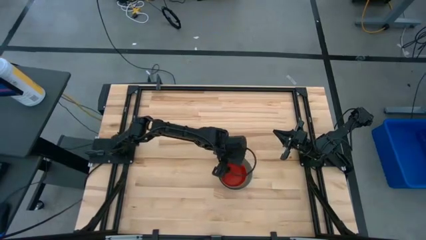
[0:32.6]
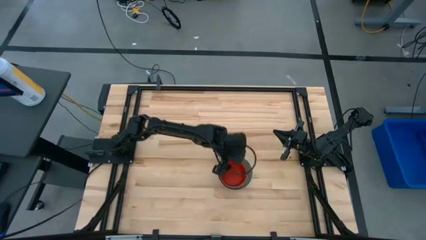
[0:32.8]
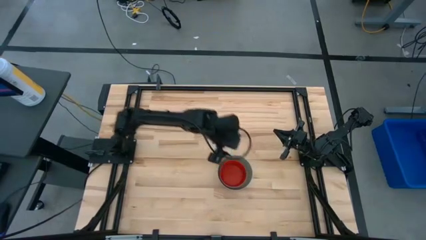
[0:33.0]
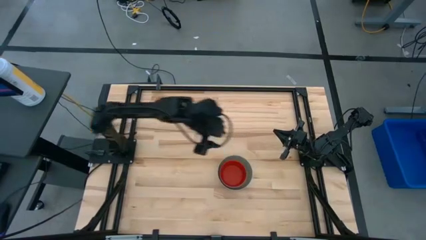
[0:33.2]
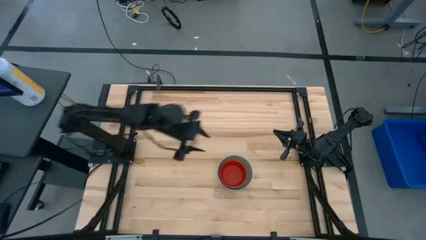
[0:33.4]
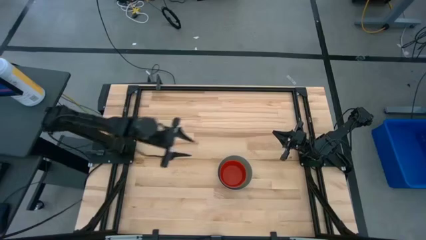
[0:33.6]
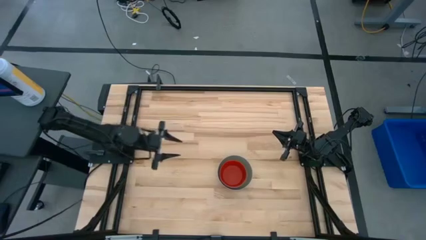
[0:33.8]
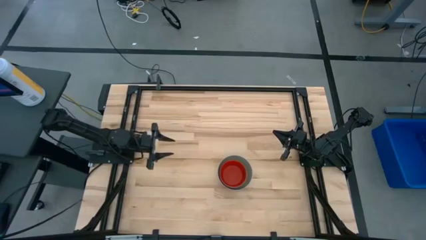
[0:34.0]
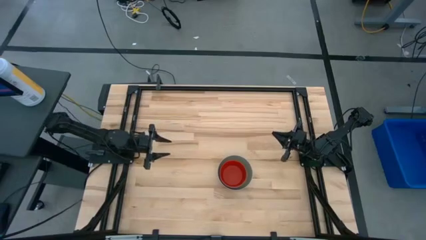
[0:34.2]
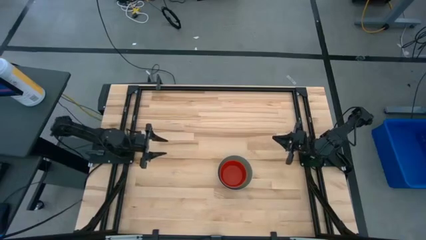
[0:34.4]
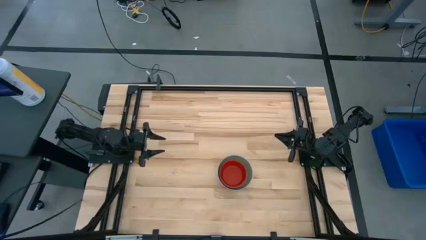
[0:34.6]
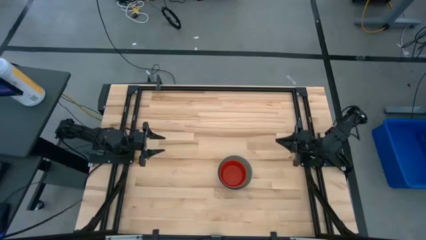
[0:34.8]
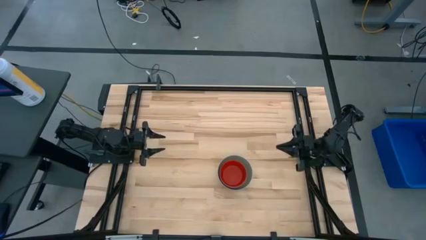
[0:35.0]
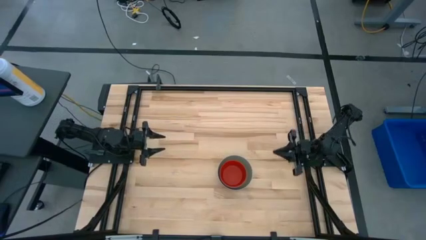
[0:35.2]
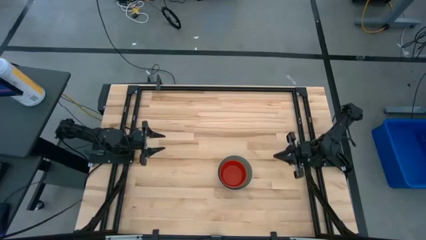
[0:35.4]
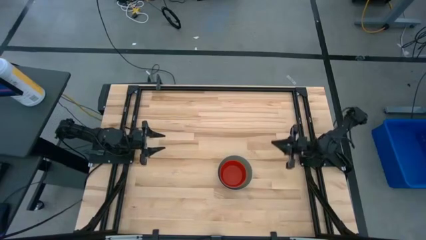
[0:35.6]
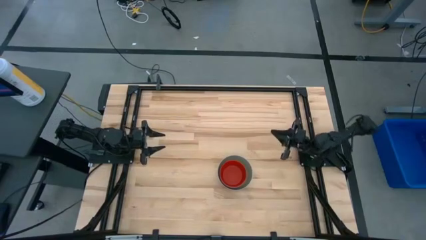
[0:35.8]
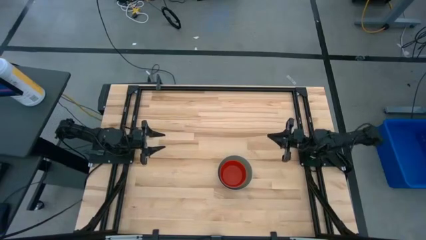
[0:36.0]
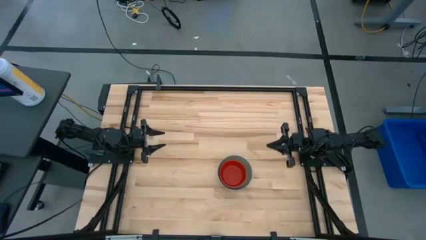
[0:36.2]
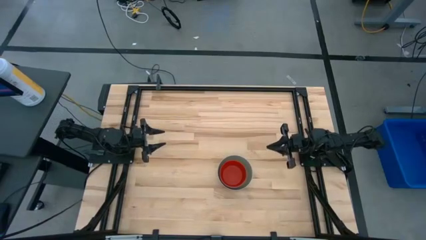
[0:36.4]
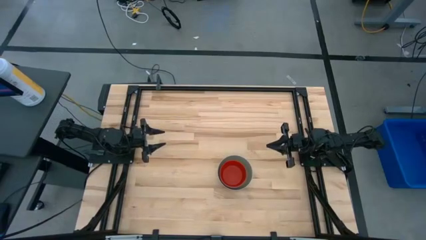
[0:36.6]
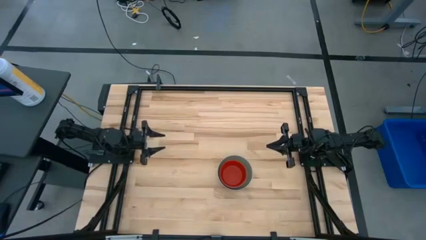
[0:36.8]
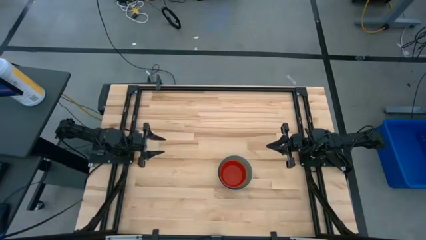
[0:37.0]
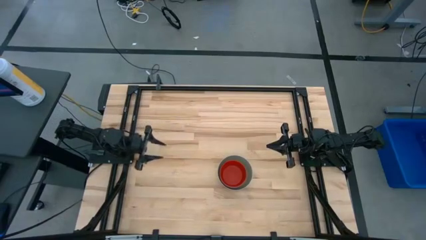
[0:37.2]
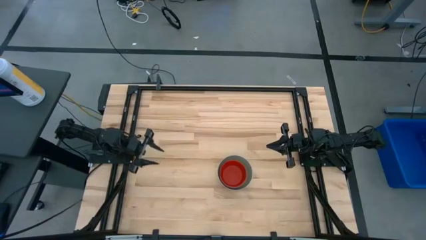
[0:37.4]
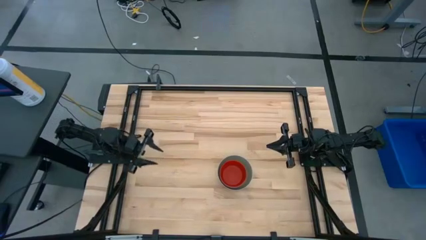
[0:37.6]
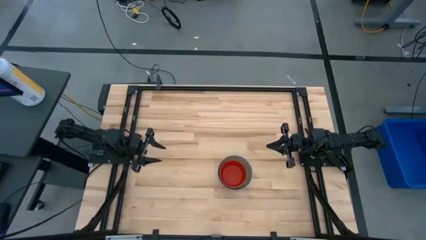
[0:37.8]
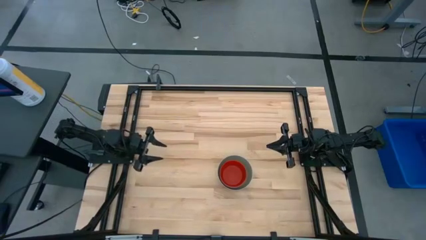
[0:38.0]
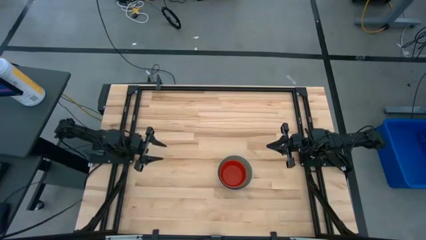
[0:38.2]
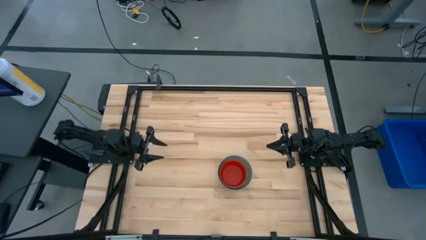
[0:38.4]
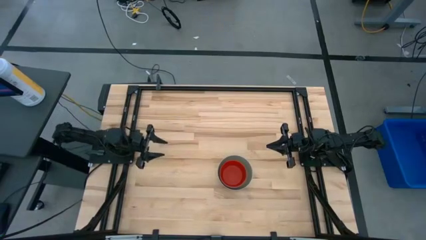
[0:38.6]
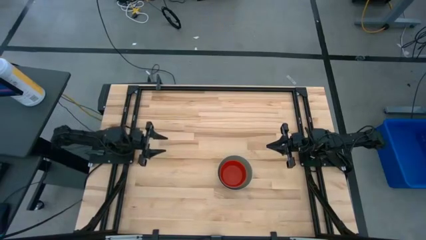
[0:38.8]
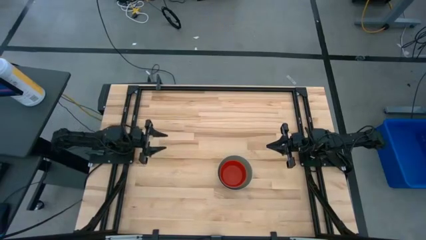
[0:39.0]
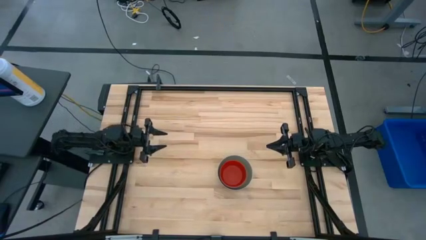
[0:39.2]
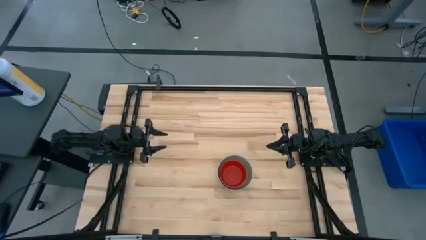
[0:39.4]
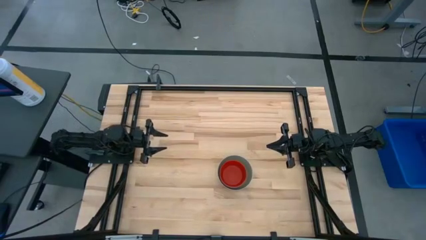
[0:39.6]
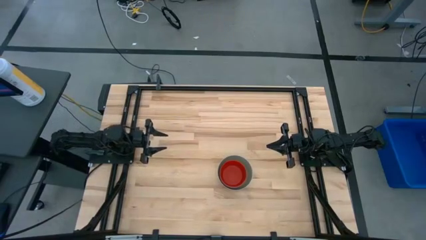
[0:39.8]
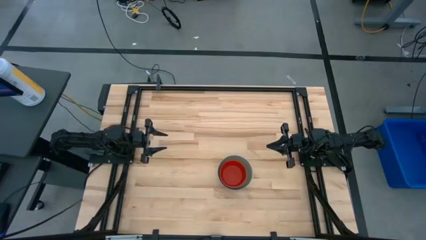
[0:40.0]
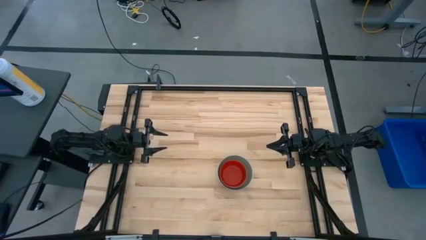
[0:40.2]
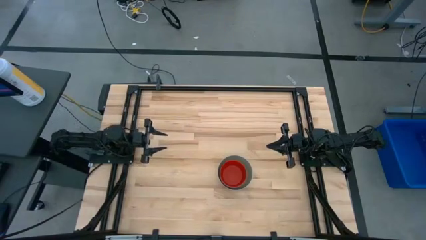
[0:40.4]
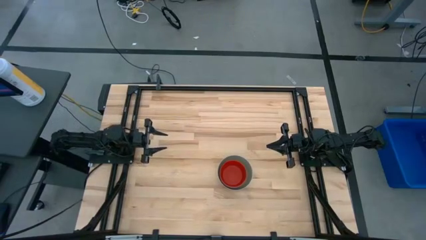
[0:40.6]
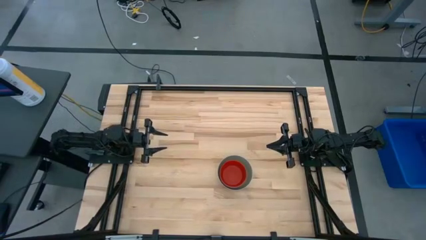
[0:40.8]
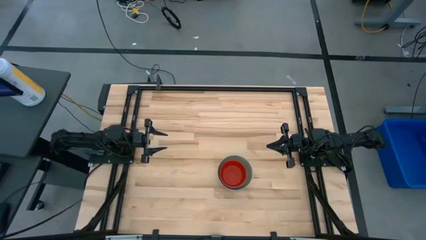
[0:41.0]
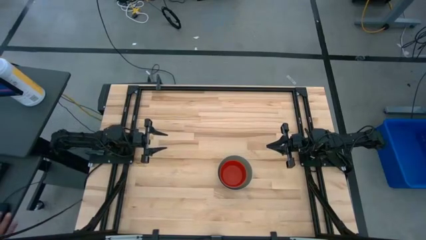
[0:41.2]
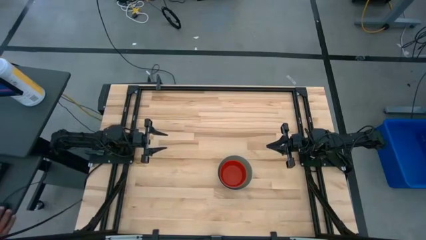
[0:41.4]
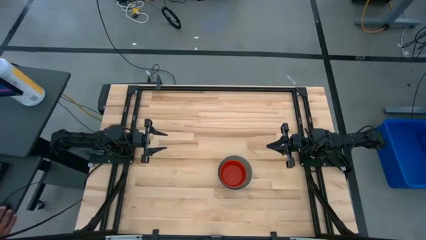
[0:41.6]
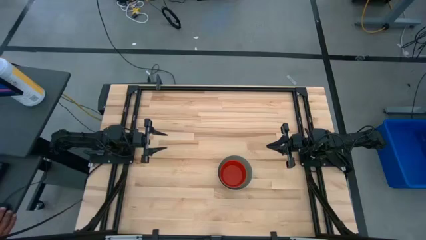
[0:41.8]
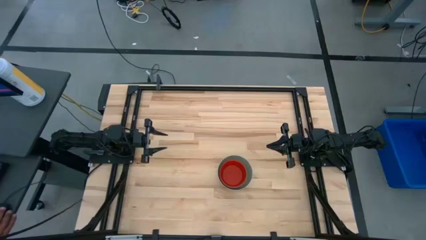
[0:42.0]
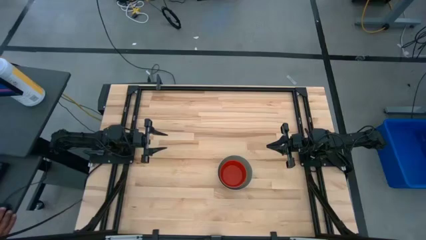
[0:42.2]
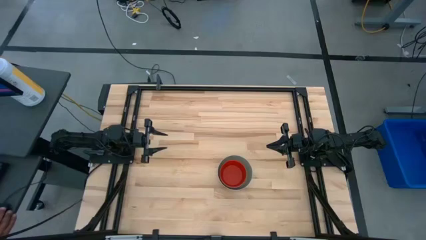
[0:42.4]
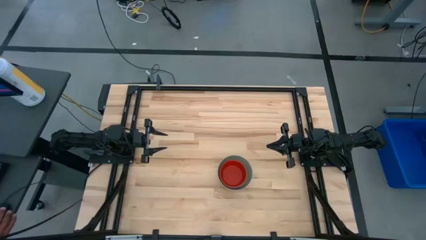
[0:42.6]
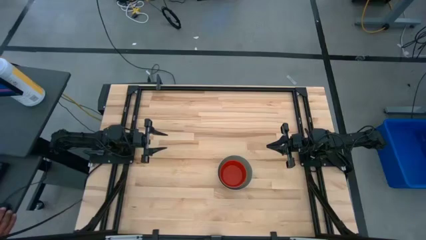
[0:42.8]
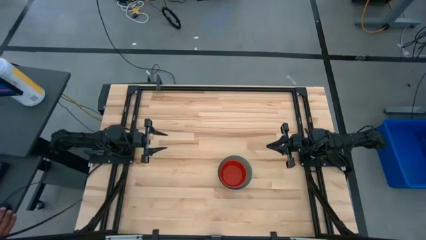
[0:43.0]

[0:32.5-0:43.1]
Return to Home Position
